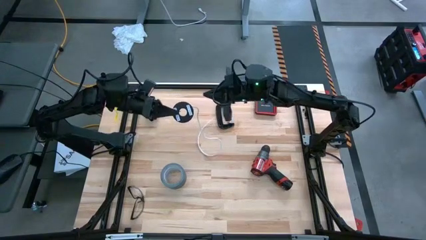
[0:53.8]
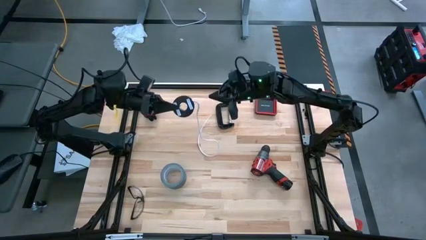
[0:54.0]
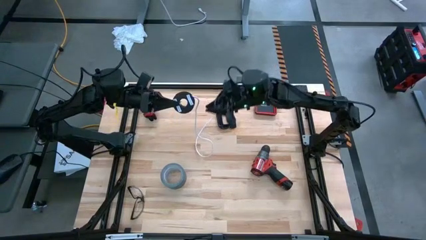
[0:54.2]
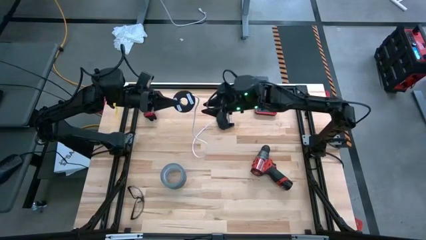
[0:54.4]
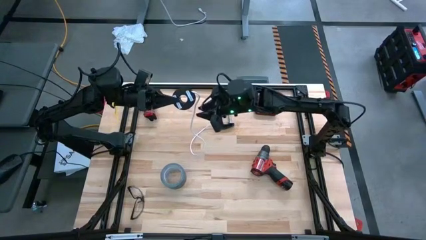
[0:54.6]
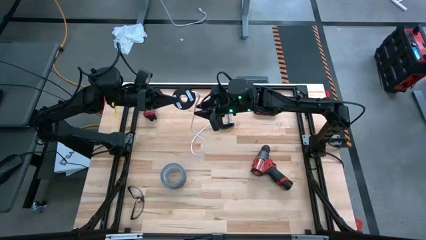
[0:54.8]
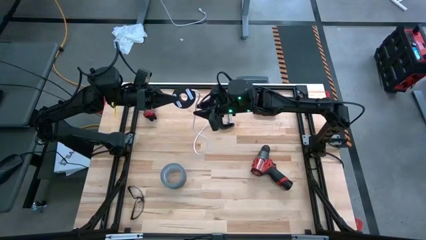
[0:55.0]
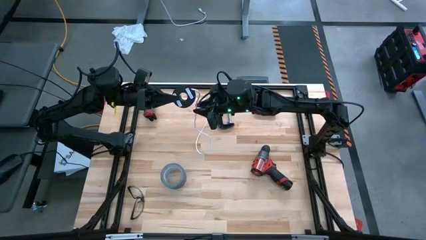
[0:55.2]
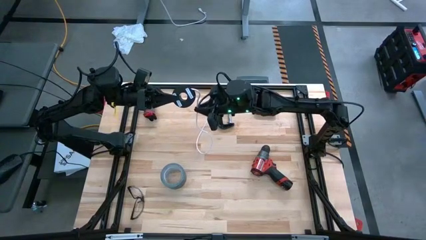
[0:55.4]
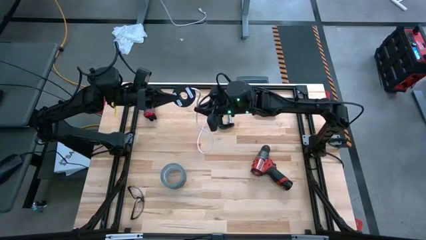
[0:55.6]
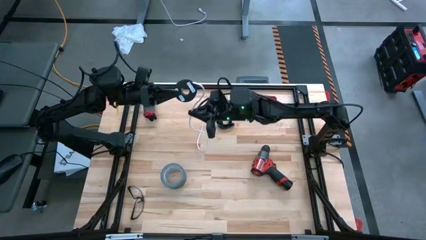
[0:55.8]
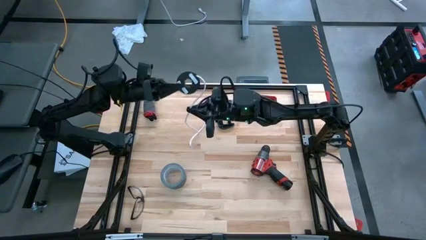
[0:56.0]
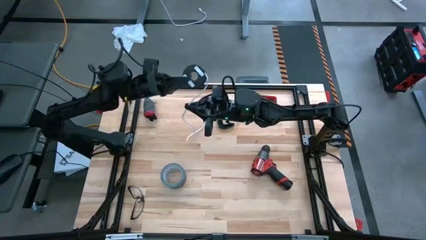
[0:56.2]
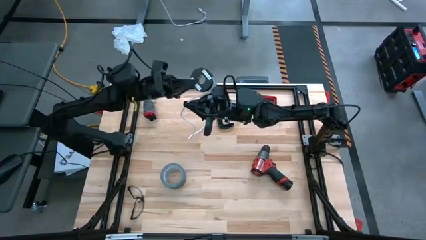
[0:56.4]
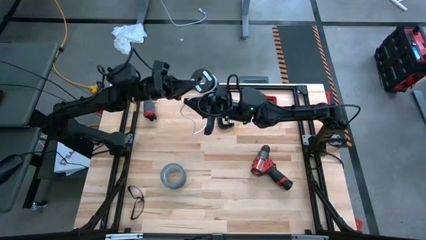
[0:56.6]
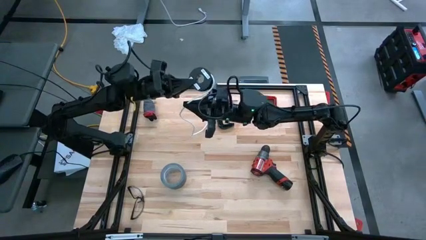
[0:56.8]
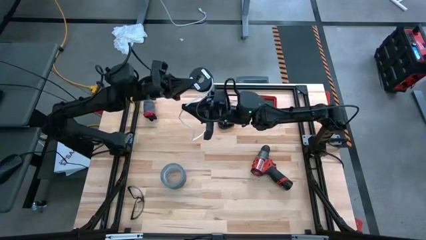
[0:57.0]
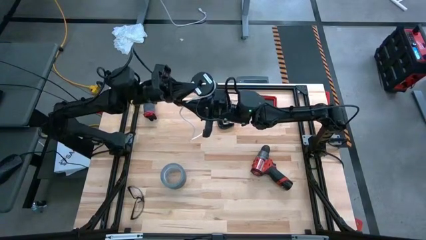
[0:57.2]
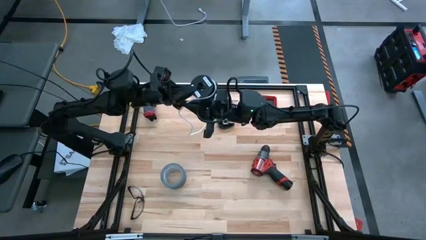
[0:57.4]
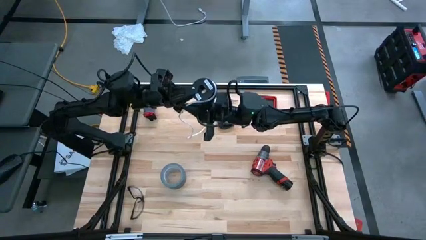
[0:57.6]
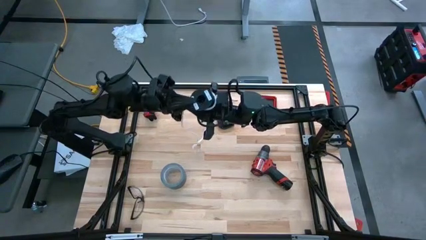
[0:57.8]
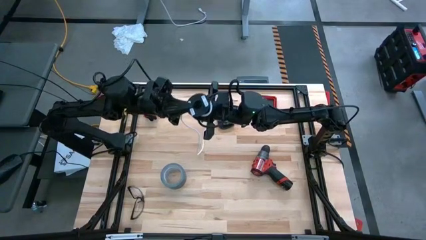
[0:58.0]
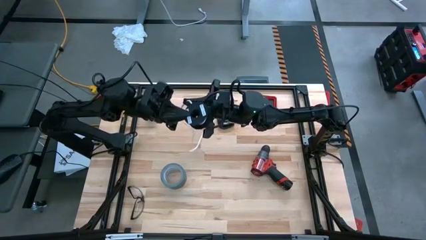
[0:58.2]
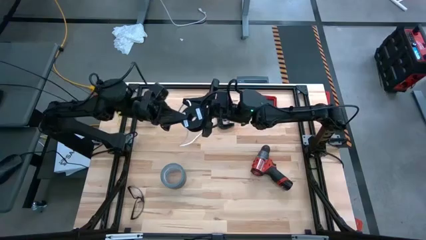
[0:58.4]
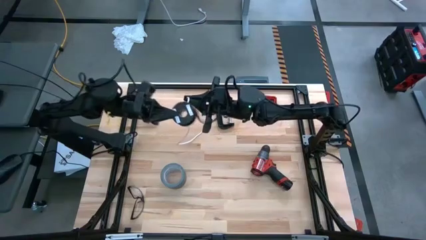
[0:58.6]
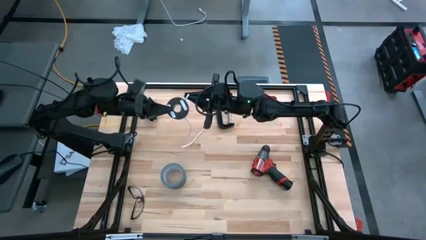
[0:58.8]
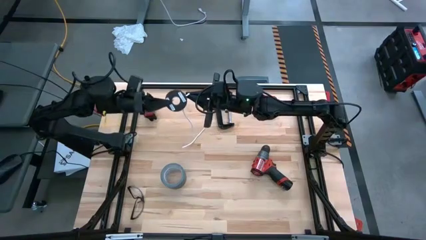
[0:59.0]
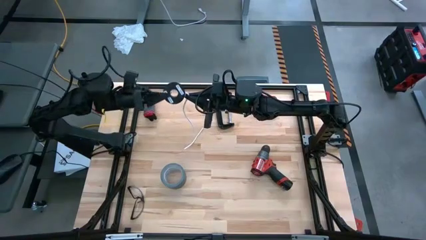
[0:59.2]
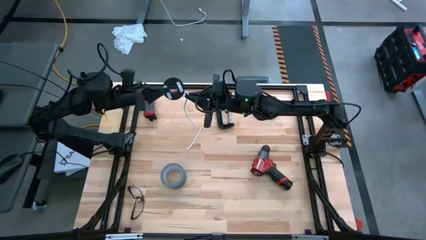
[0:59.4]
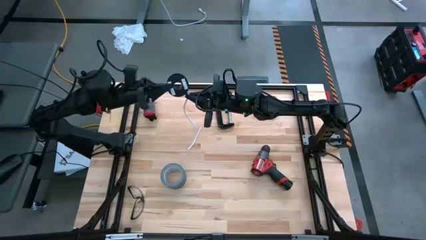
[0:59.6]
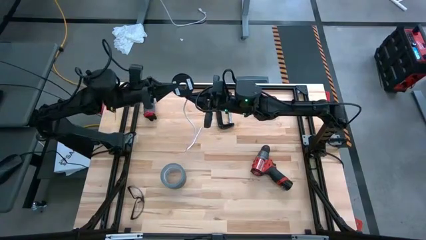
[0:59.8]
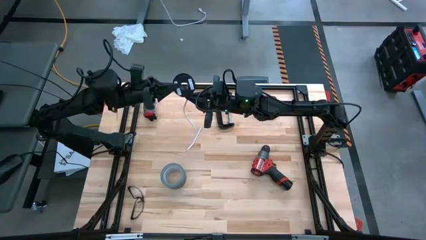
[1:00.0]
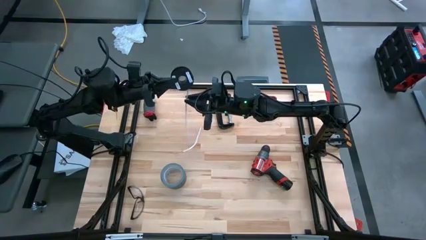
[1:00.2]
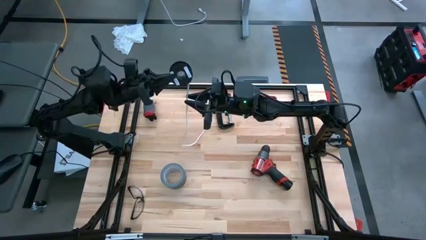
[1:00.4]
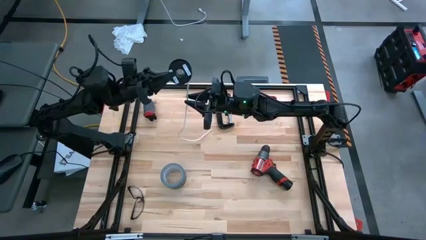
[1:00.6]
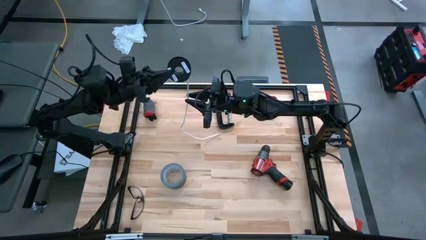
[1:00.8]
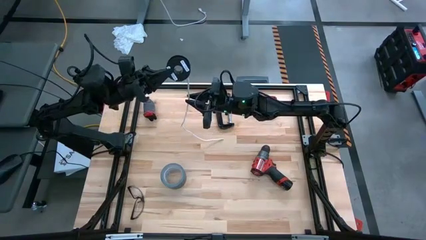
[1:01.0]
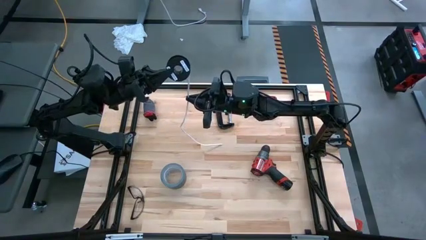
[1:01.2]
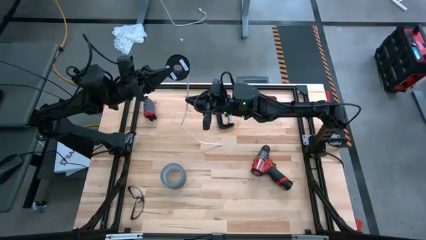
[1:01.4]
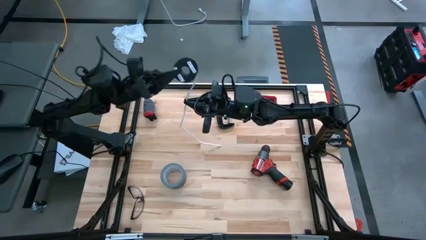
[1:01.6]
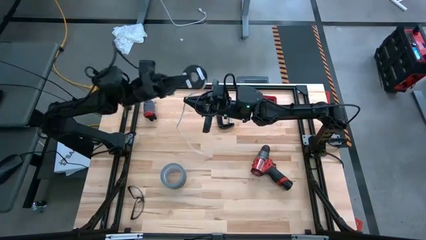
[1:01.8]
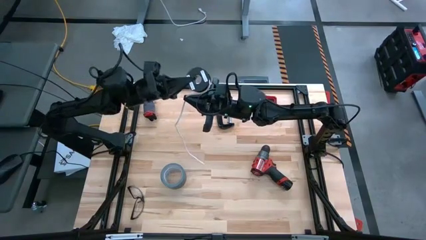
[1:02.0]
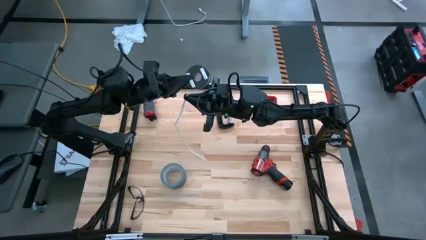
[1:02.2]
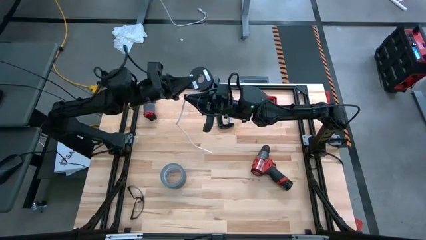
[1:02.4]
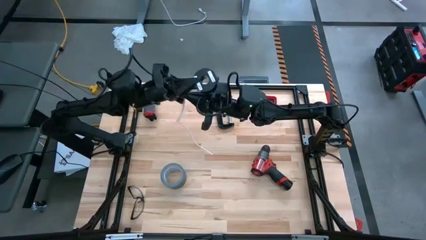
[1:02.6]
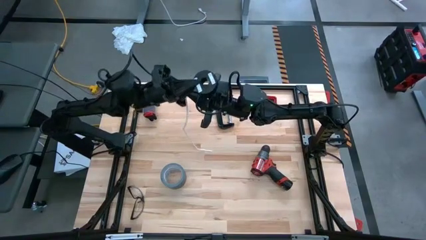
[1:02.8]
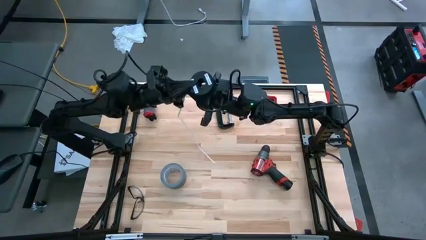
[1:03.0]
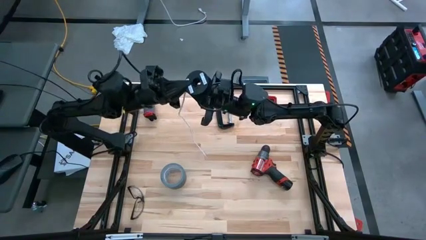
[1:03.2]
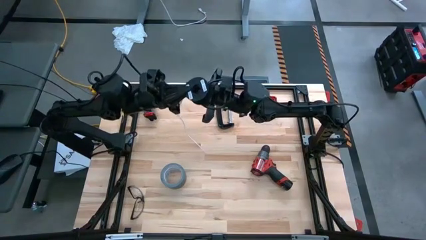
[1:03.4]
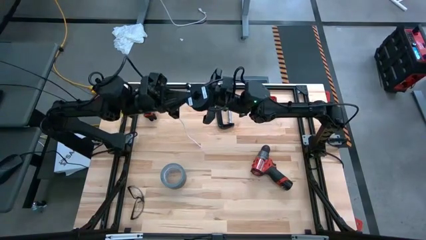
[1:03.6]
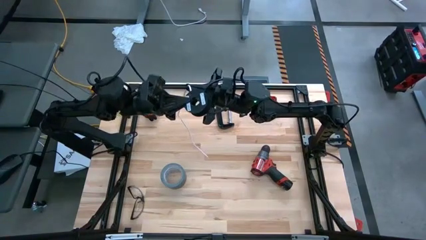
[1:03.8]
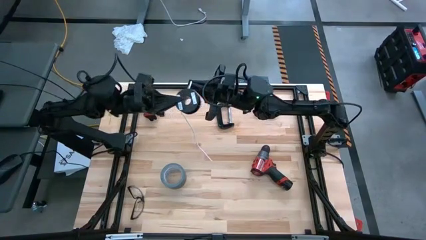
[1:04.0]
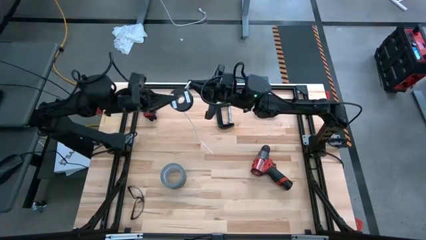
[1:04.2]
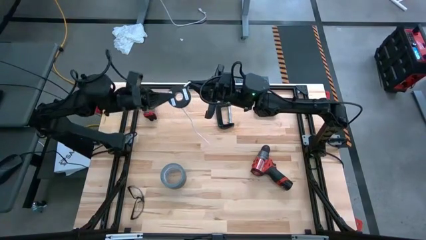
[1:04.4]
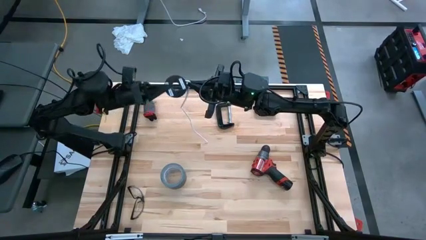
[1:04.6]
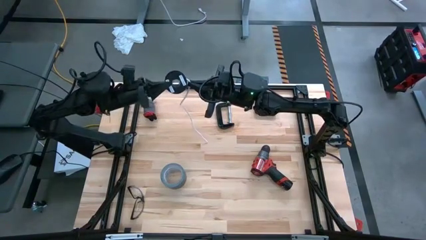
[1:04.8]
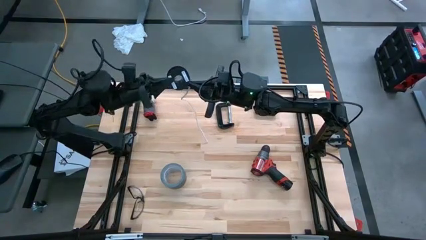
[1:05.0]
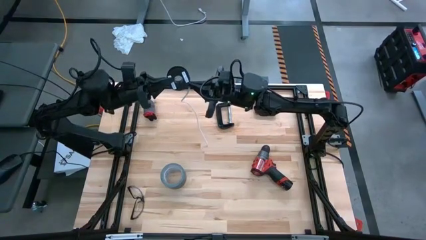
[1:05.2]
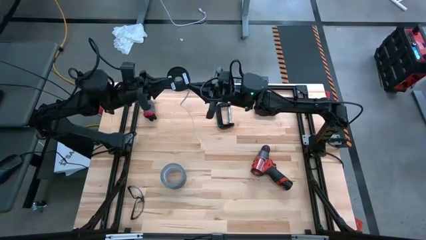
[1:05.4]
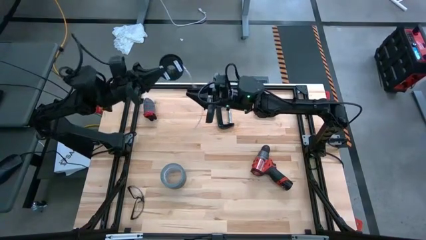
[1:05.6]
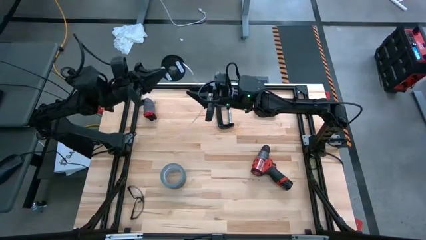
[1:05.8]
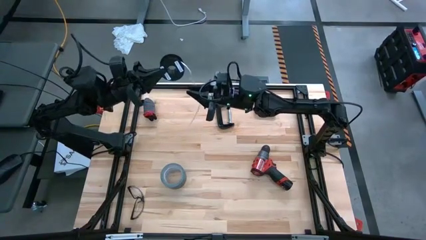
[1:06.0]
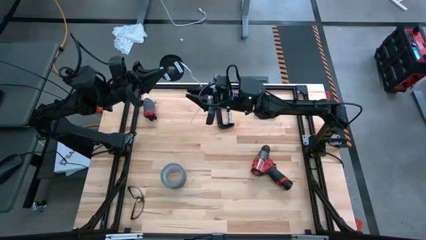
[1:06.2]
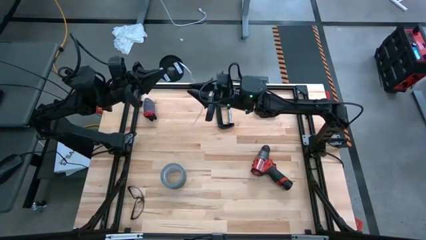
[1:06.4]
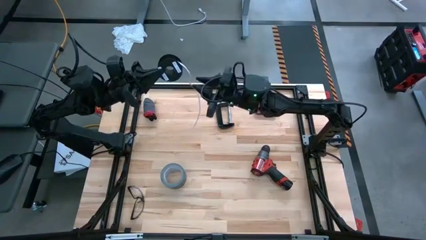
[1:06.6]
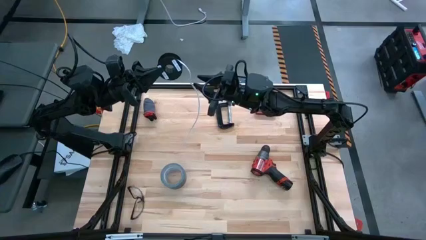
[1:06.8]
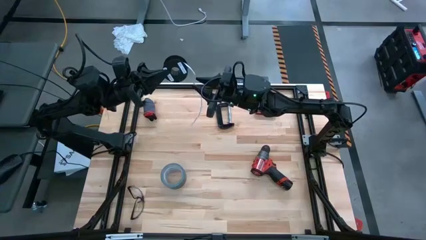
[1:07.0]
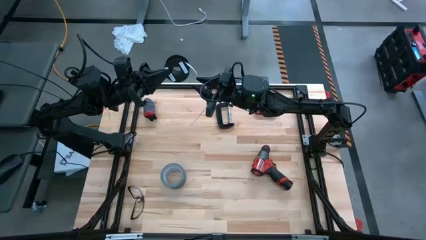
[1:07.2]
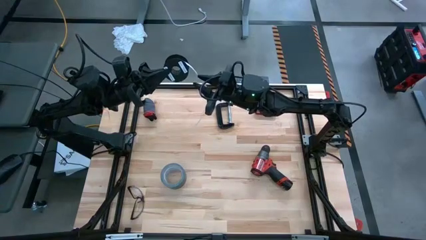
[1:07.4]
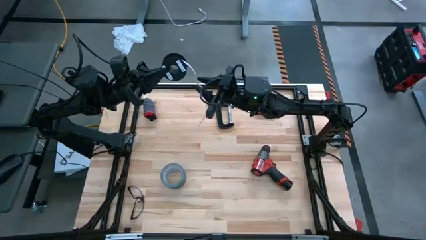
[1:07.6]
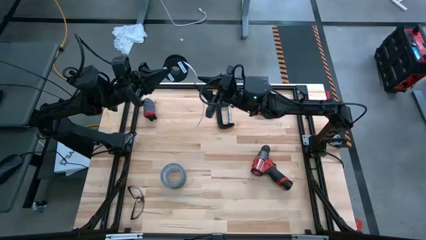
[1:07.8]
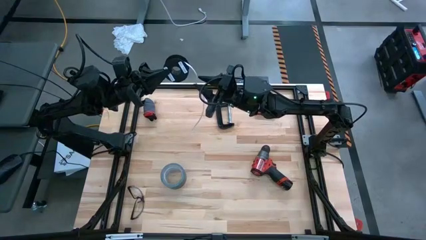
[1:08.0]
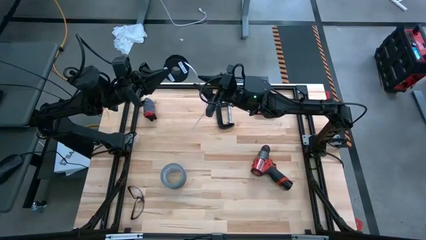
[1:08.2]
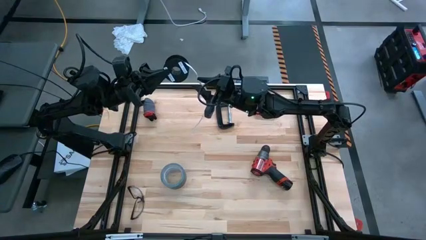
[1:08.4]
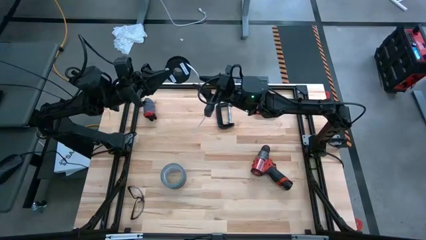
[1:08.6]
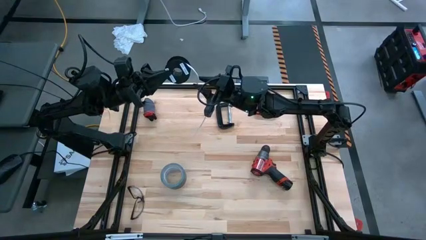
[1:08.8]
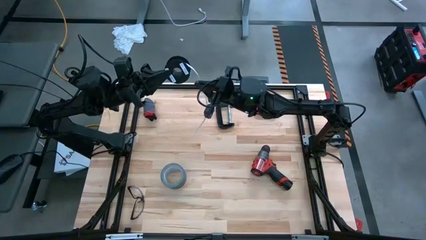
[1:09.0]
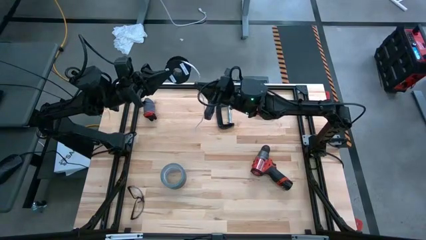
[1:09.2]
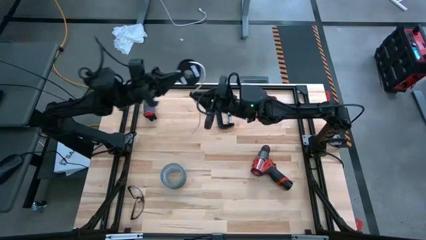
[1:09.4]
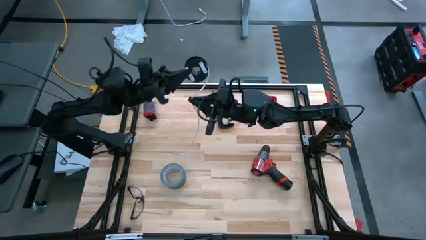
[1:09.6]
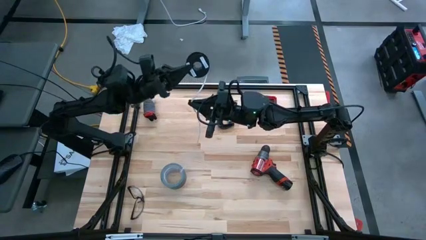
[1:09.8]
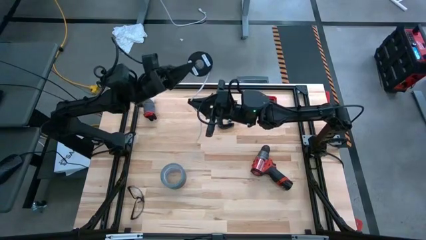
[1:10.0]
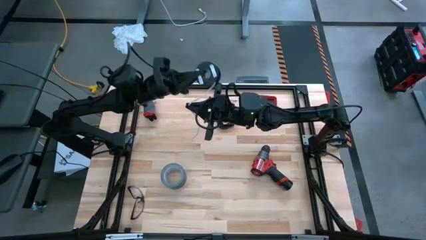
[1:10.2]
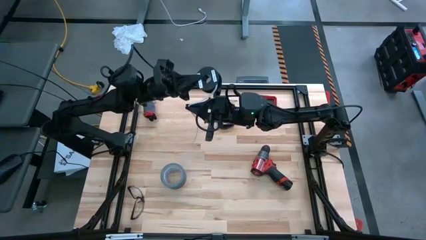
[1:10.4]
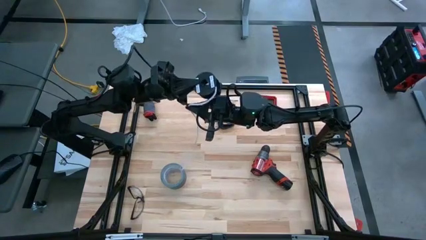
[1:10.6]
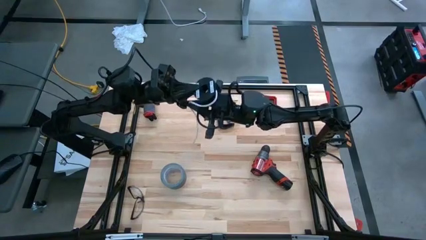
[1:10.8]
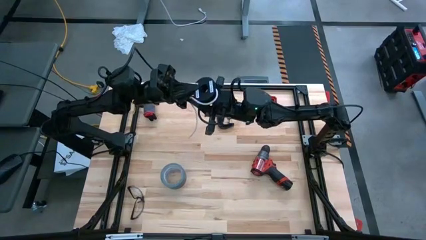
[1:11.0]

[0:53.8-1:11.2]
Task: Coil cords
Coil the white wire onto the black spool
